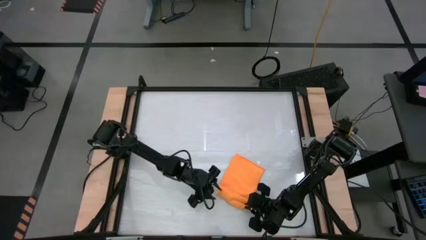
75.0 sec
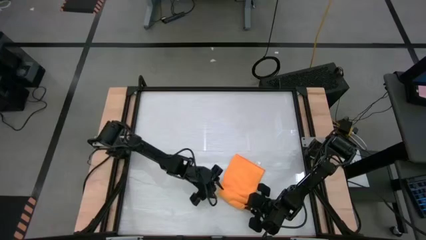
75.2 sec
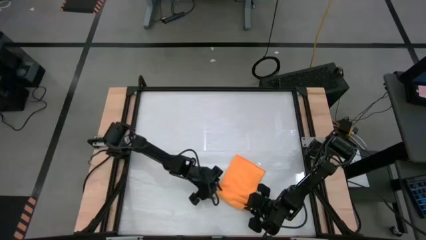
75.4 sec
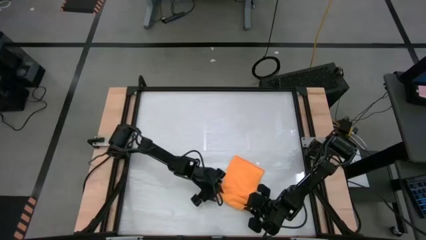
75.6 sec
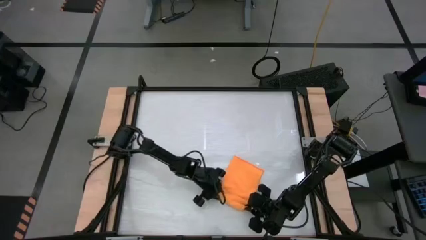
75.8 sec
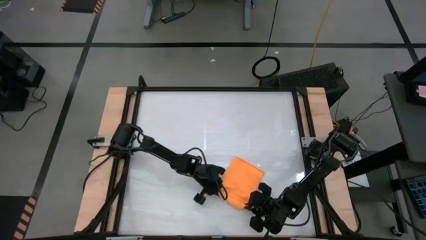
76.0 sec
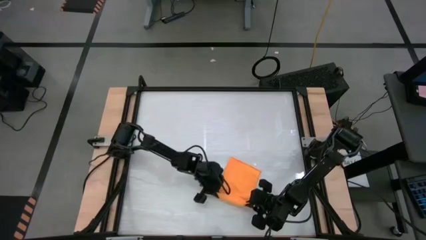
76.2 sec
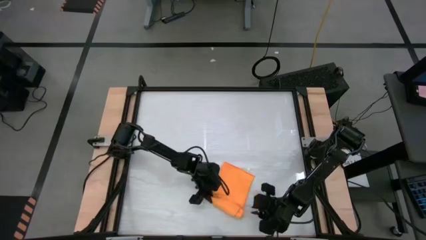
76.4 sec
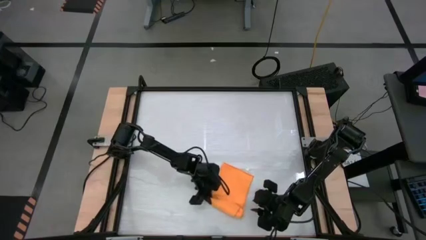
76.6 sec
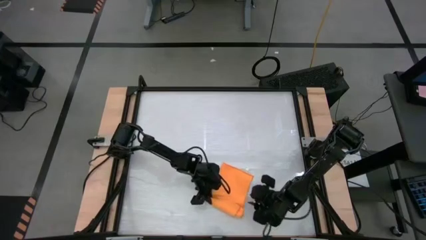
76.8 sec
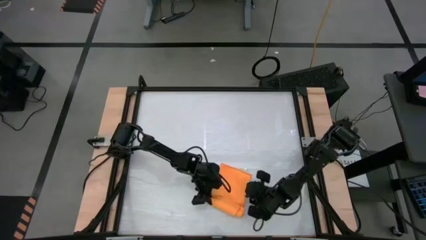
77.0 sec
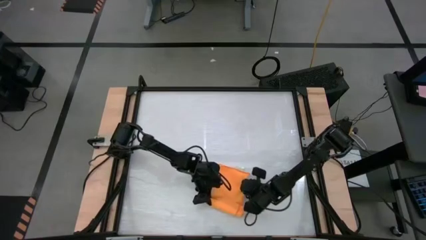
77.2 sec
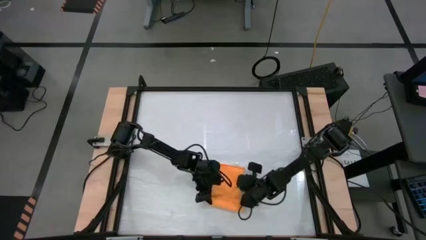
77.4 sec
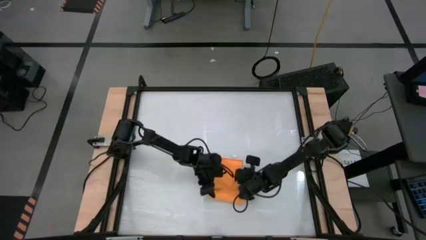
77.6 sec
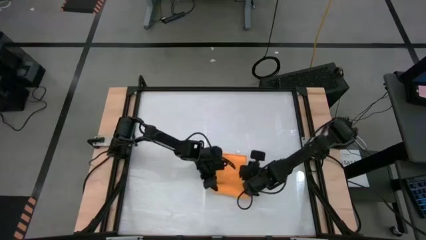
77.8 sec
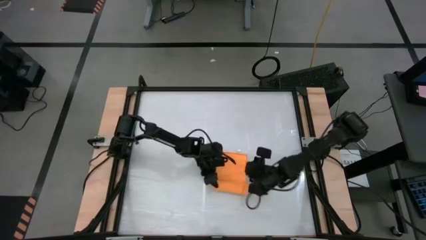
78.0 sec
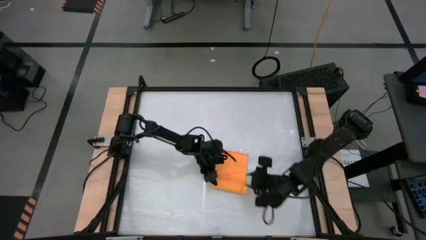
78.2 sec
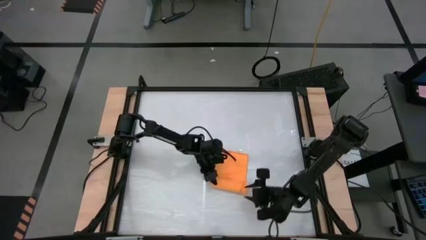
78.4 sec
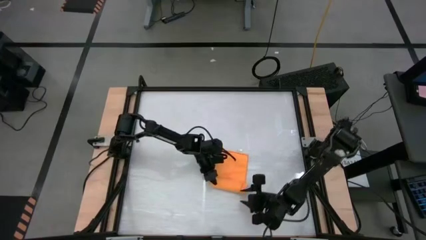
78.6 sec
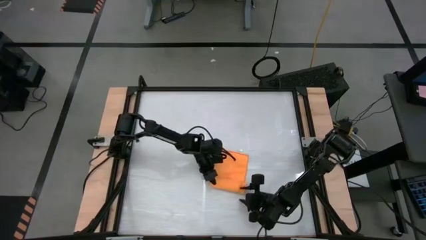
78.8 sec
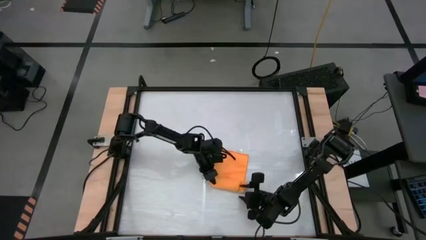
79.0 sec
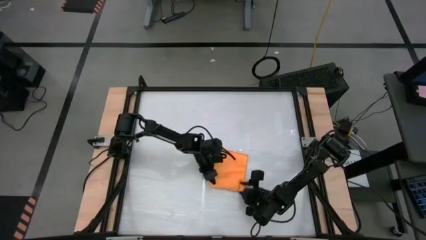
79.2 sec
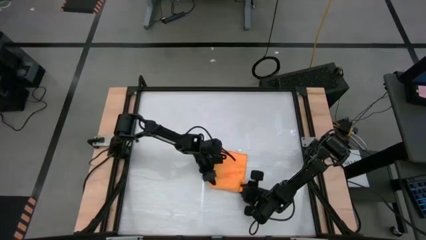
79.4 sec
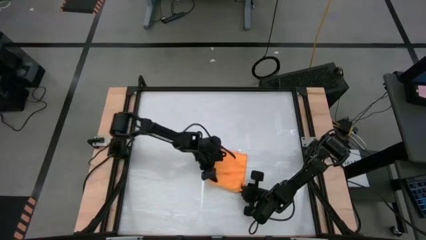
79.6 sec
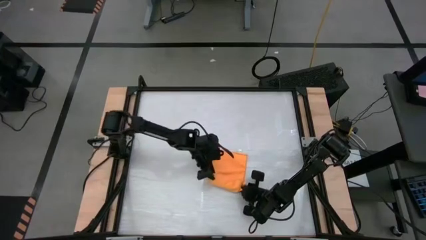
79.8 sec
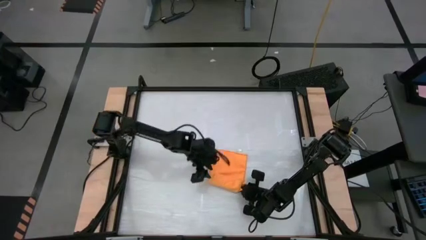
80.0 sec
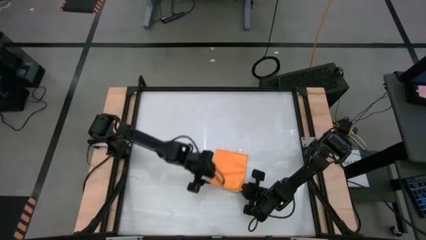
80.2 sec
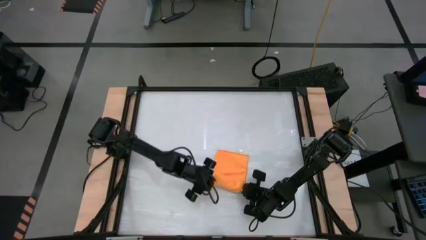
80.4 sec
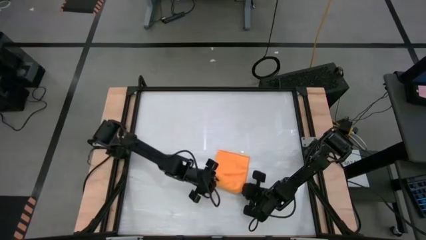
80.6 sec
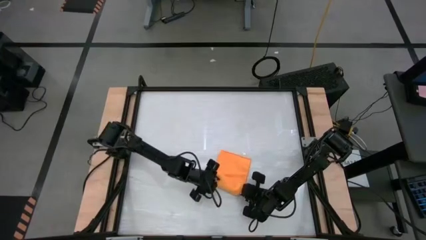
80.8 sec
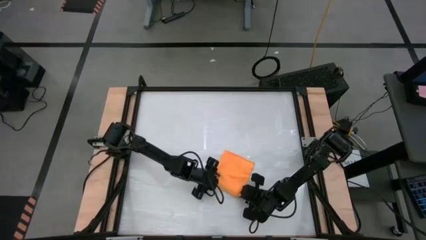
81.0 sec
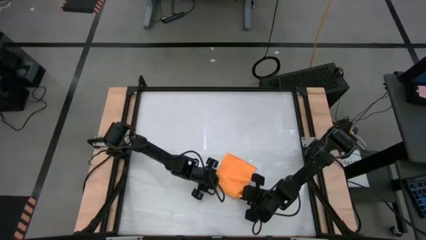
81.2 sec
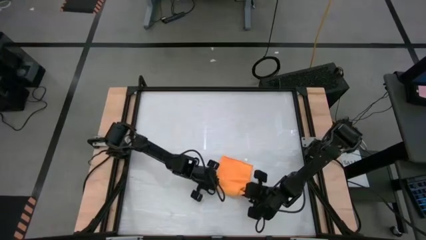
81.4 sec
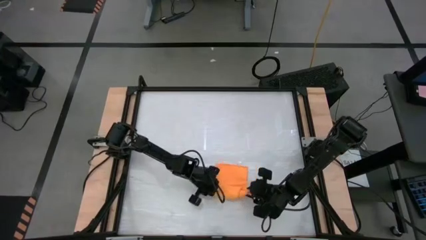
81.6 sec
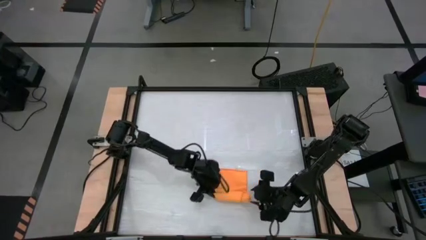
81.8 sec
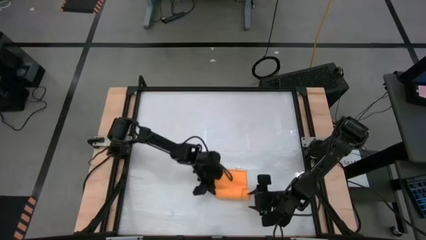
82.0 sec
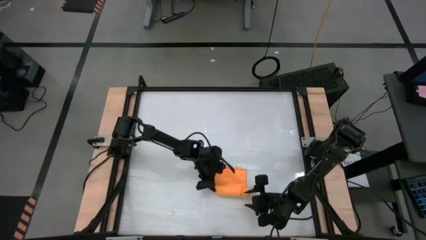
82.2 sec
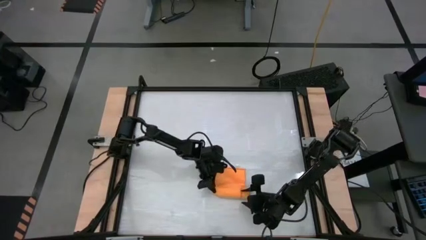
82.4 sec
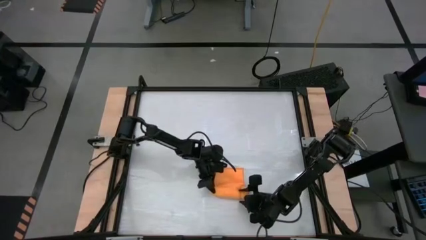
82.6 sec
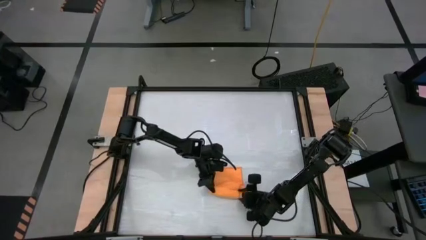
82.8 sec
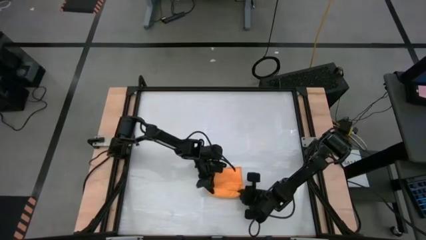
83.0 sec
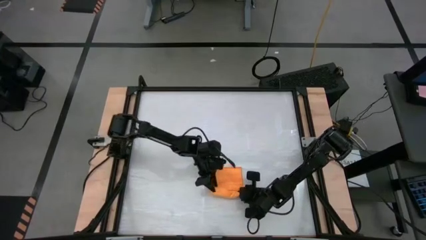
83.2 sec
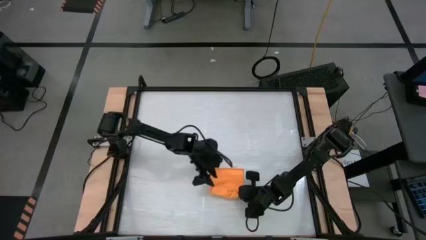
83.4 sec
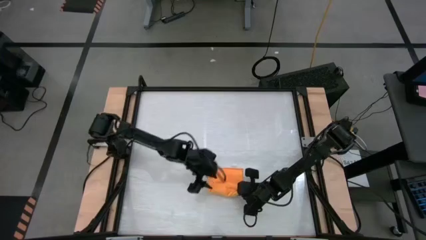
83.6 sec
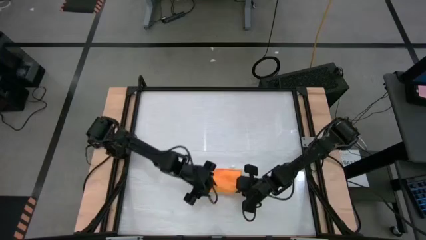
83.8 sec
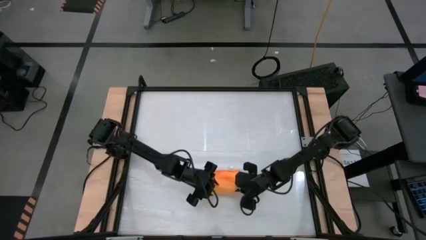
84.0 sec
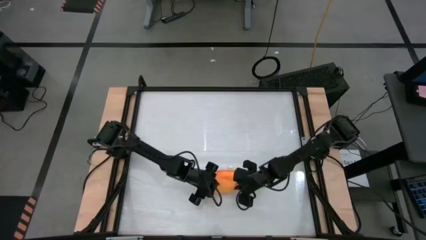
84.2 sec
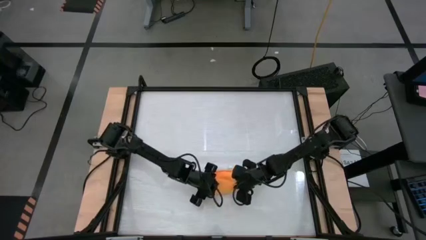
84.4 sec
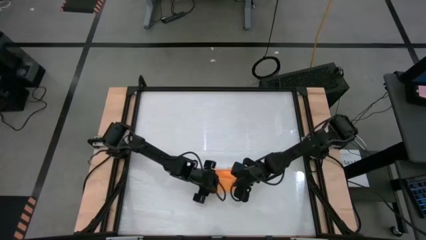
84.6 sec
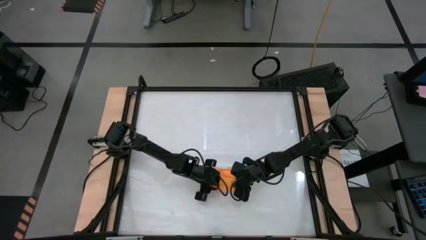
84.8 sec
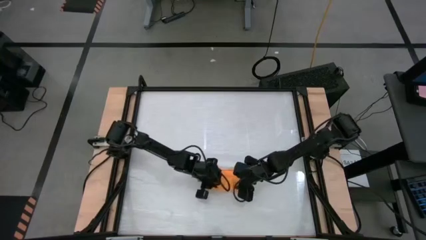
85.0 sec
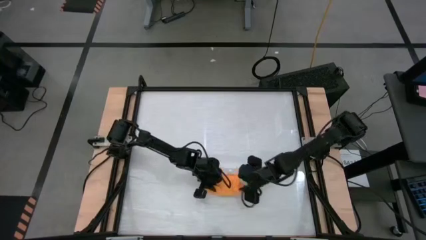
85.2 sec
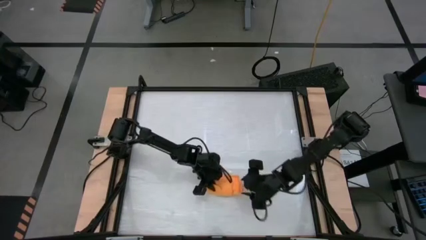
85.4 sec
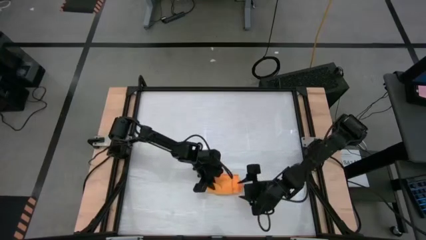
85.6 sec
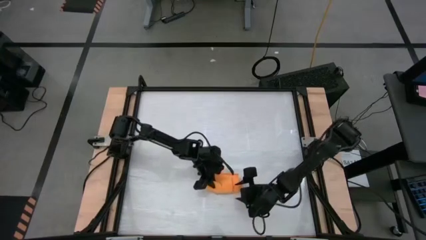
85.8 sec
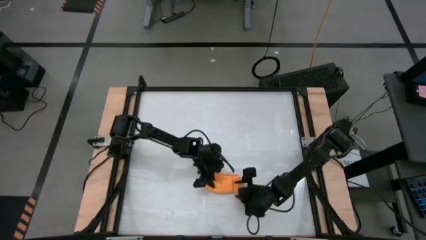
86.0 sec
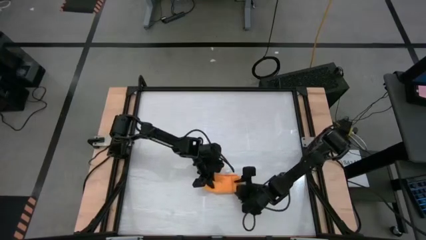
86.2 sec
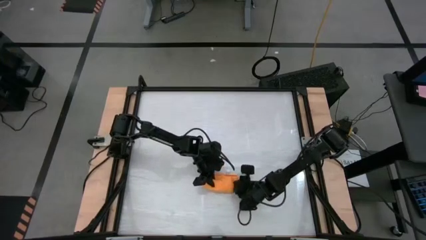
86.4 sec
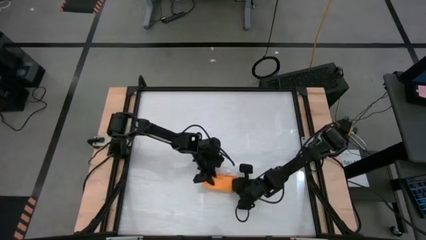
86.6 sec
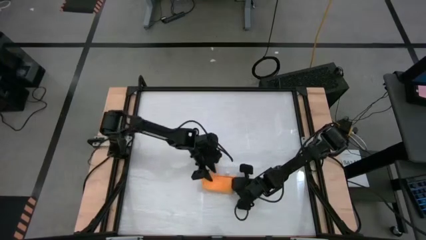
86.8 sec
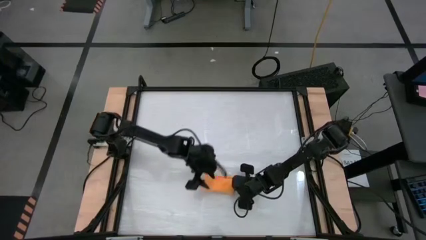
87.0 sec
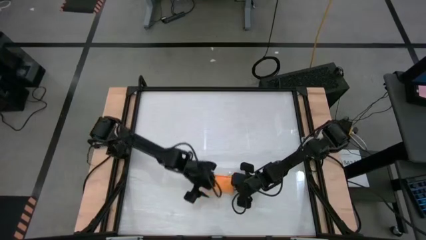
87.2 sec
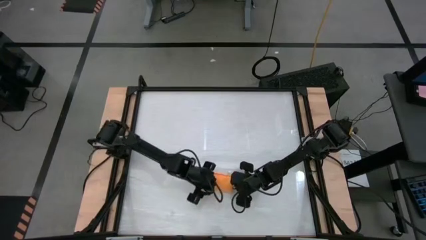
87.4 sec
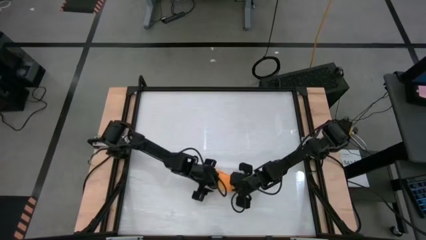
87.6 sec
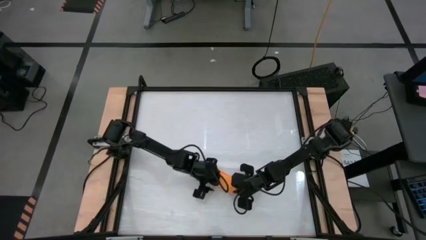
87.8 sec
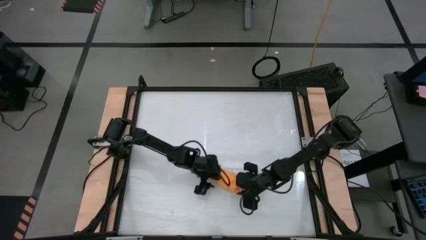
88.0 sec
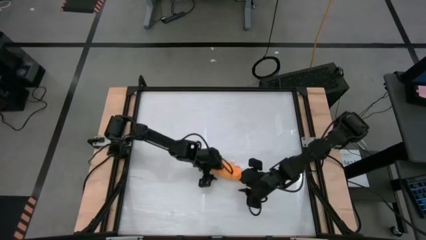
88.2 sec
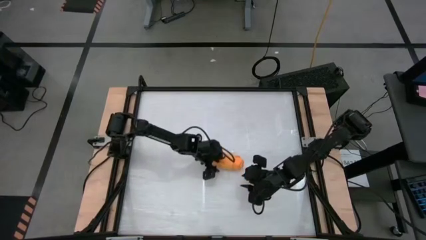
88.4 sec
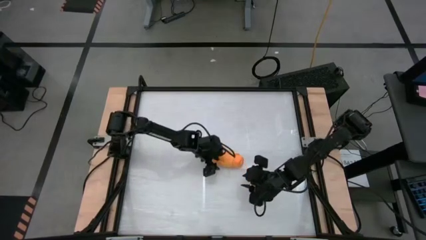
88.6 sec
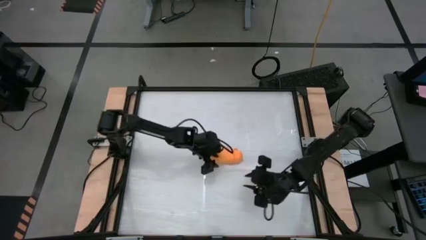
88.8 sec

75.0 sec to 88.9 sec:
Task: Roll towel
Roll the orange towel
